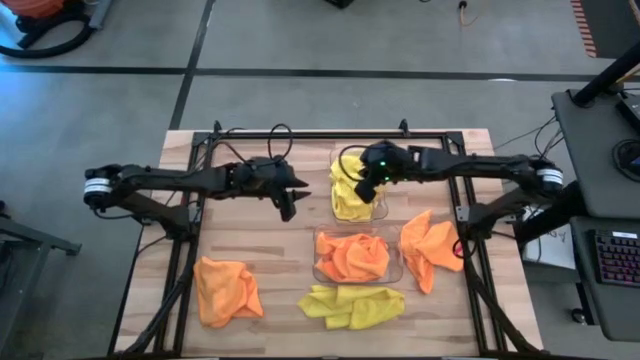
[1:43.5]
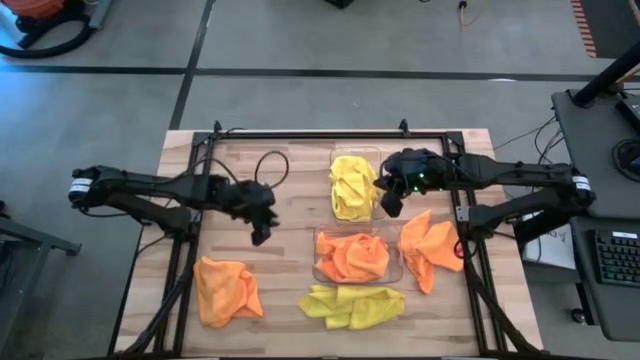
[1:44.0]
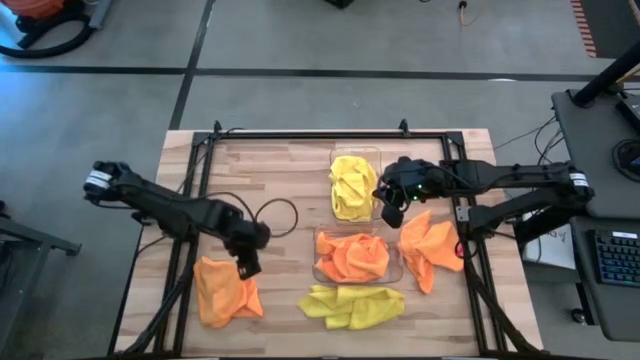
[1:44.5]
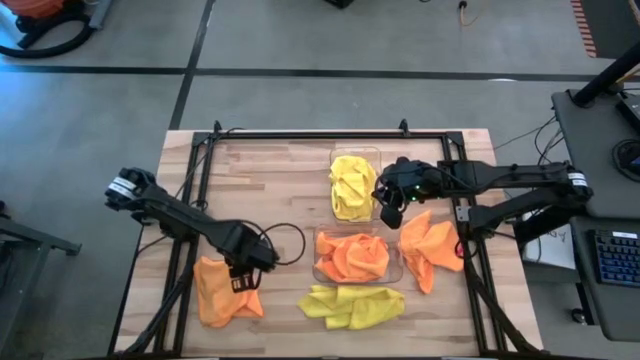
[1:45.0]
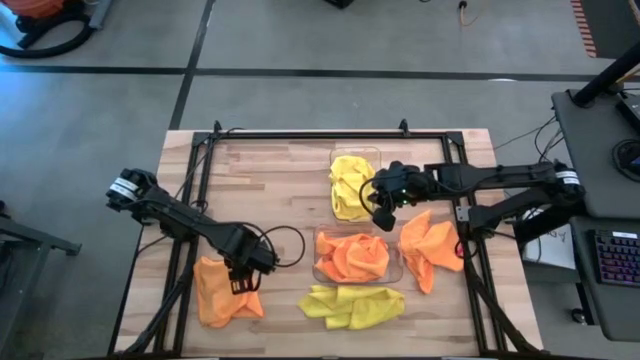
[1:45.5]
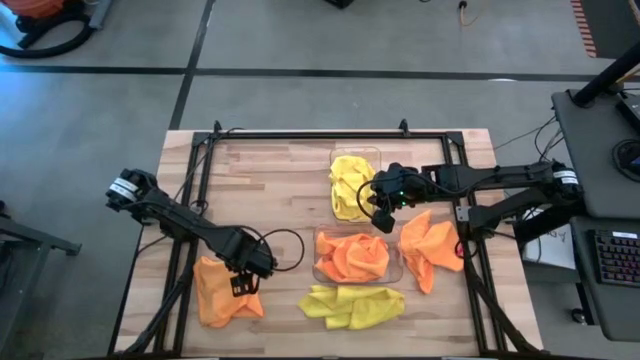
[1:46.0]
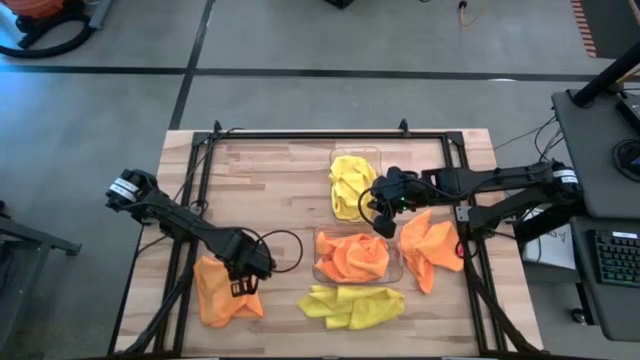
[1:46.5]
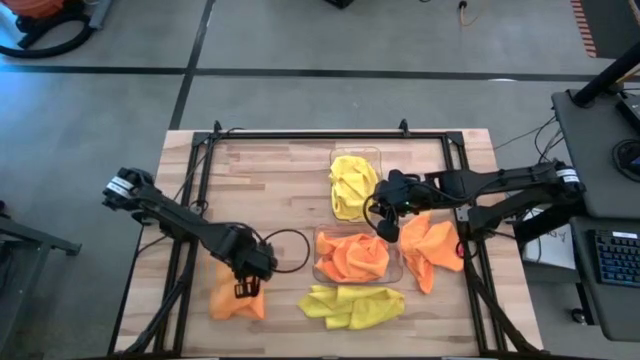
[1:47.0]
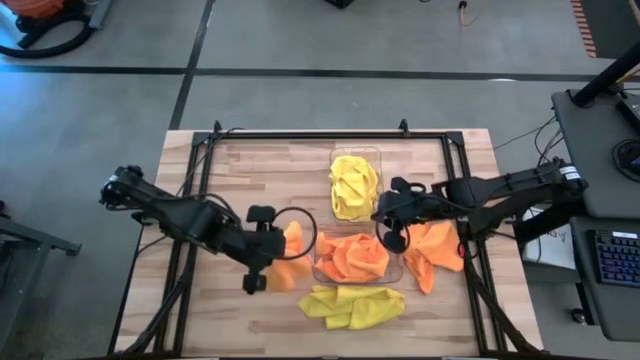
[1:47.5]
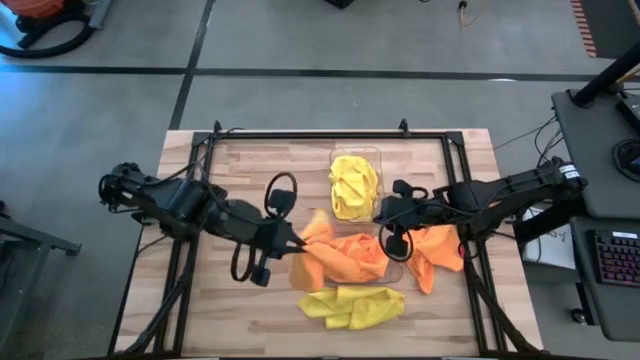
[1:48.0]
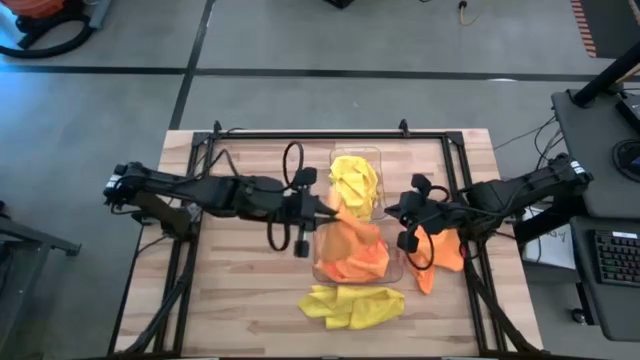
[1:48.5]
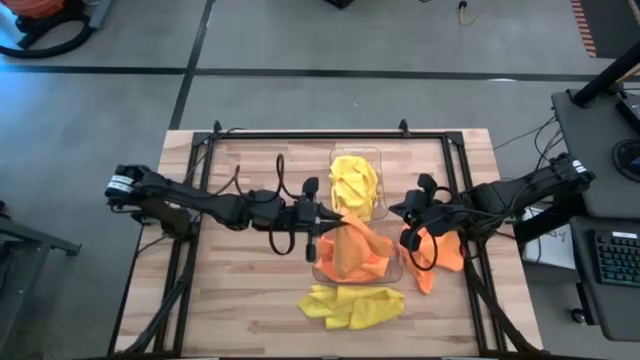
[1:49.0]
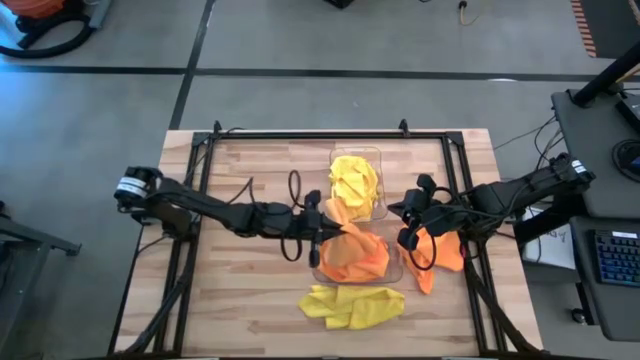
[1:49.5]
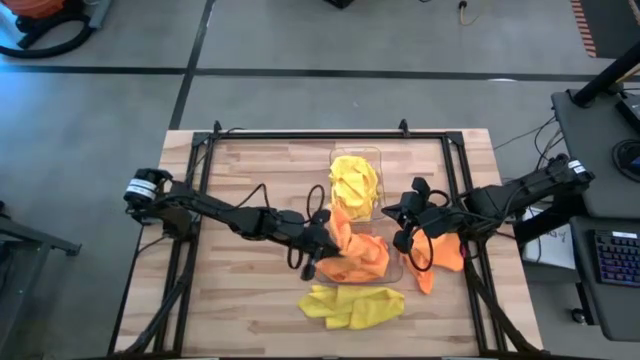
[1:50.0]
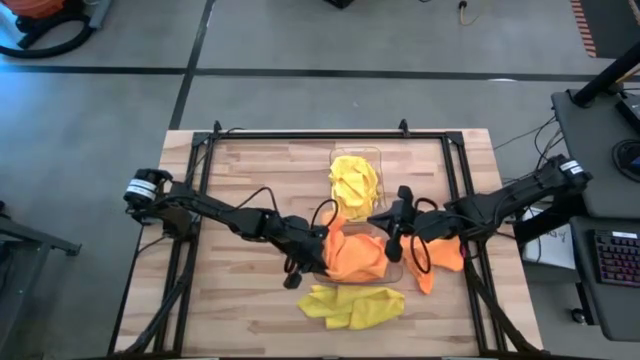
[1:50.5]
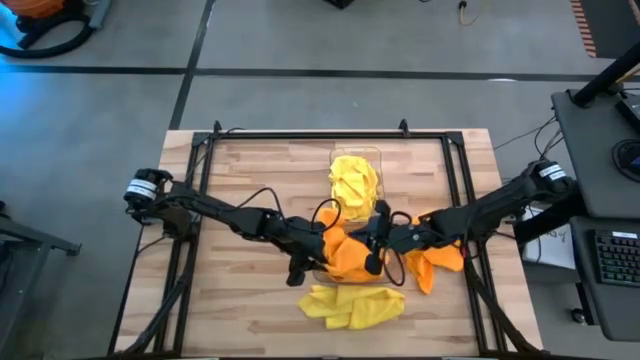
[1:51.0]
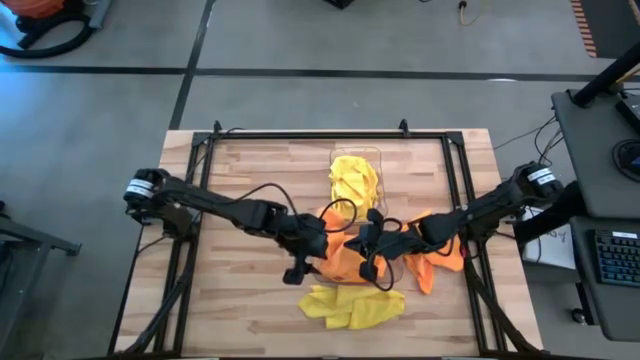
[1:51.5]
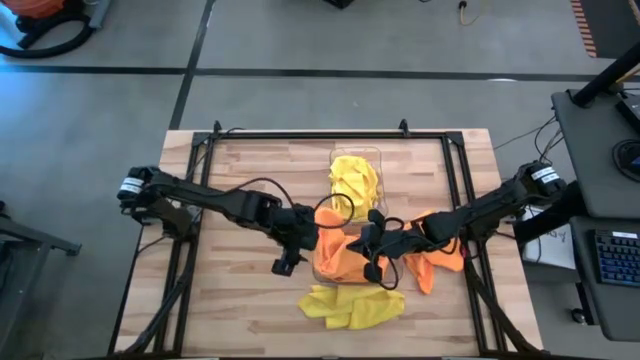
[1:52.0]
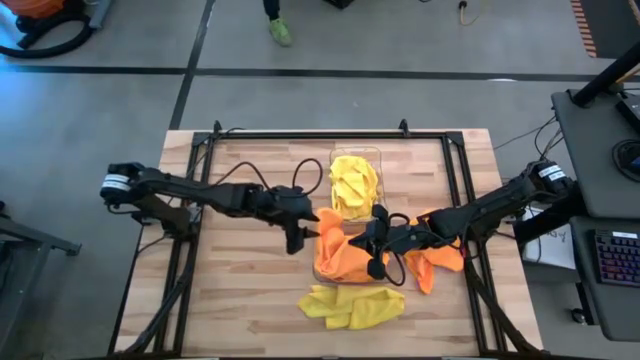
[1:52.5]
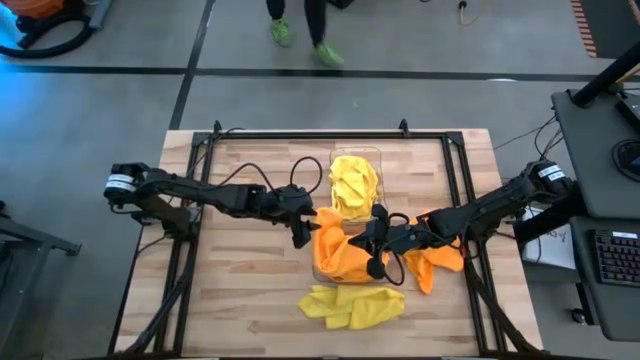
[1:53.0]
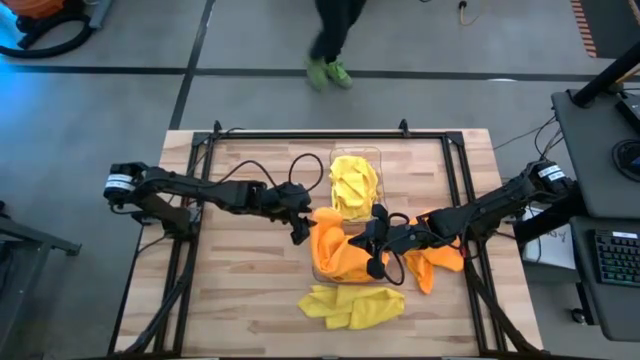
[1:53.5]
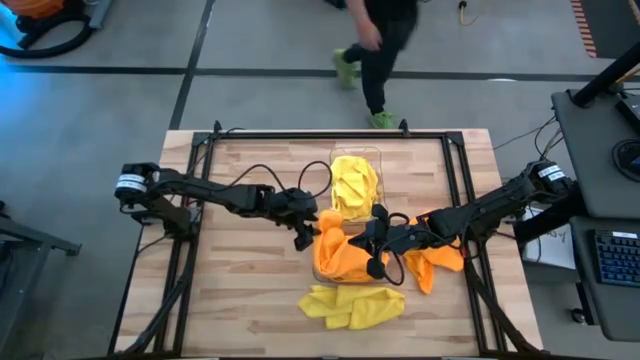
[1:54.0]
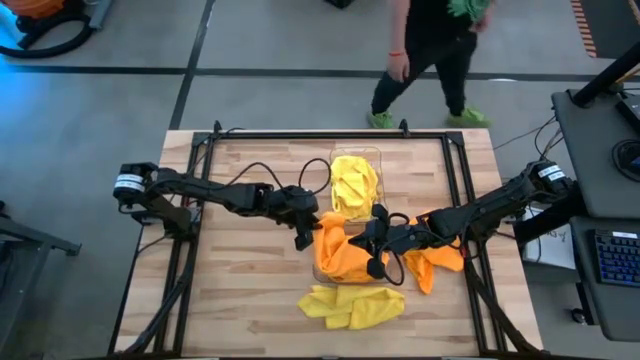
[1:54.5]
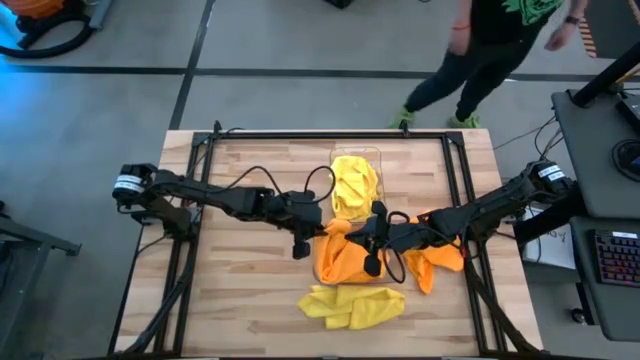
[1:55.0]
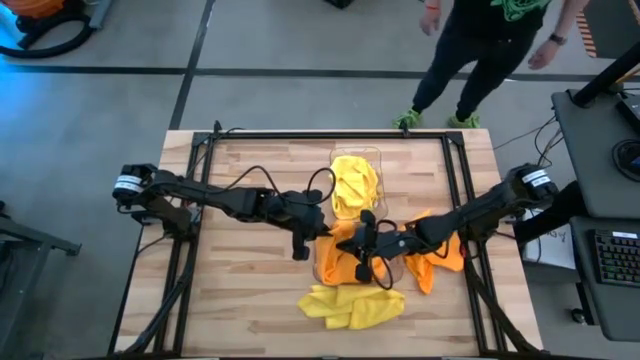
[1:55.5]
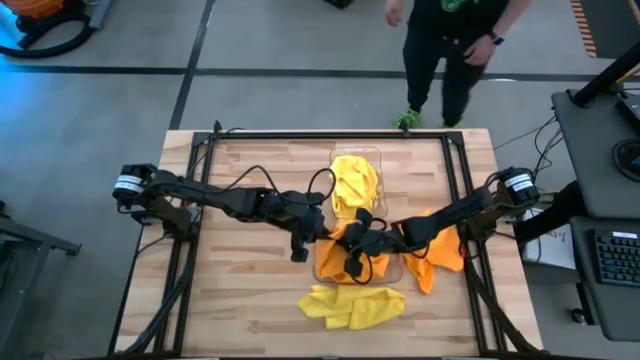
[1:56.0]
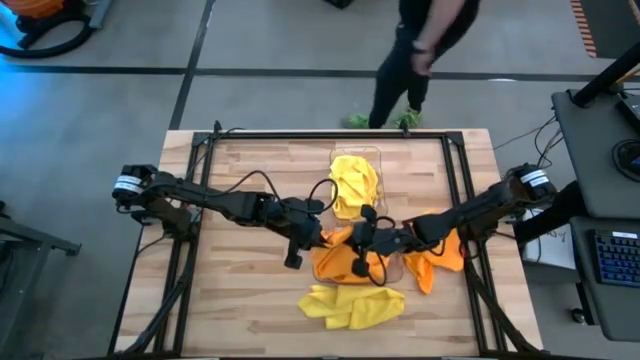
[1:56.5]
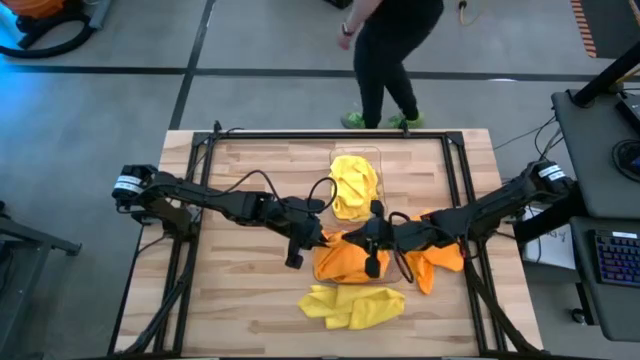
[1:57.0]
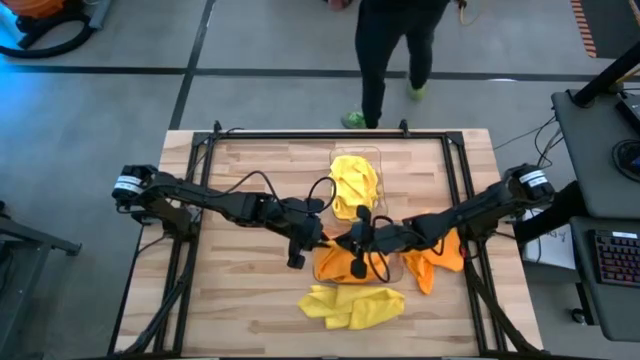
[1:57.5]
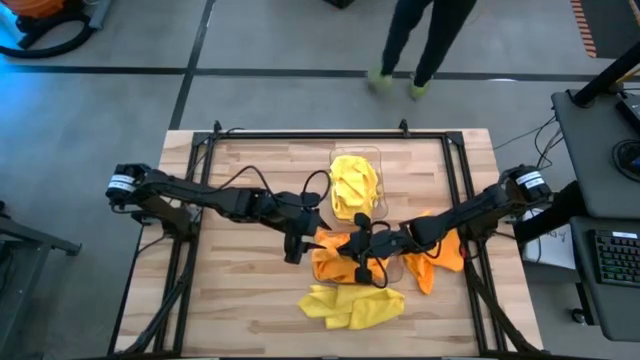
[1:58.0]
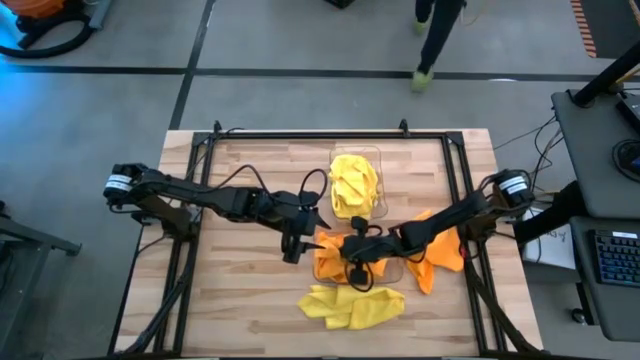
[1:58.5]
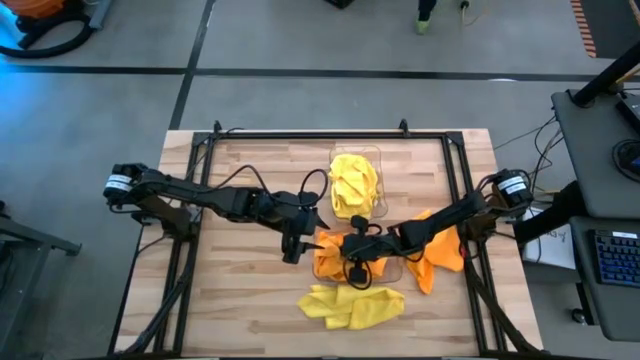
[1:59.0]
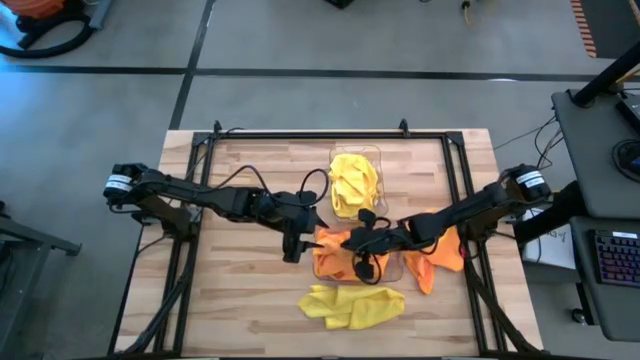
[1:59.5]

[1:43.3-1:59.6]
Task: Sort microfiber towel by color & place in baskets
Put the orange towel into the bottom transparent bin

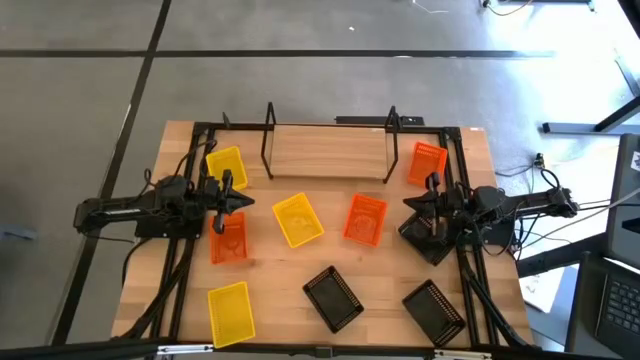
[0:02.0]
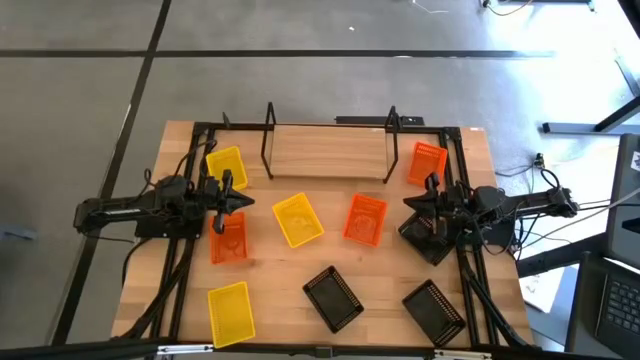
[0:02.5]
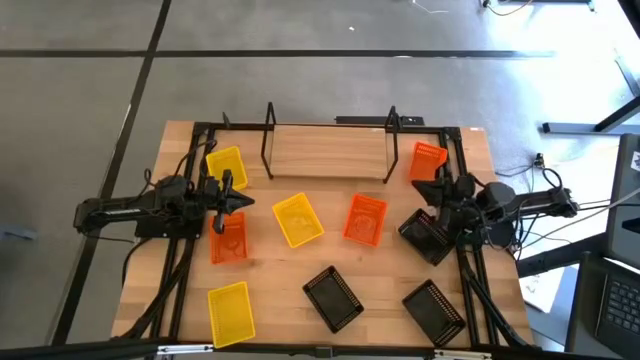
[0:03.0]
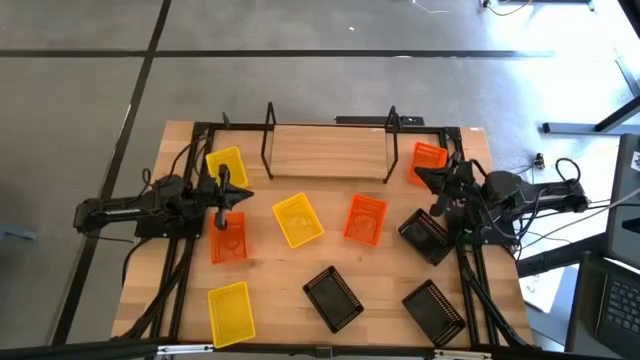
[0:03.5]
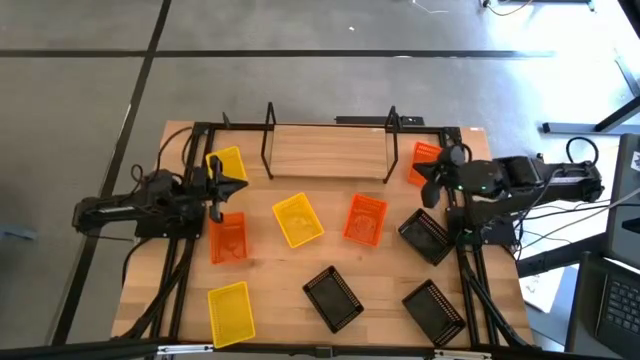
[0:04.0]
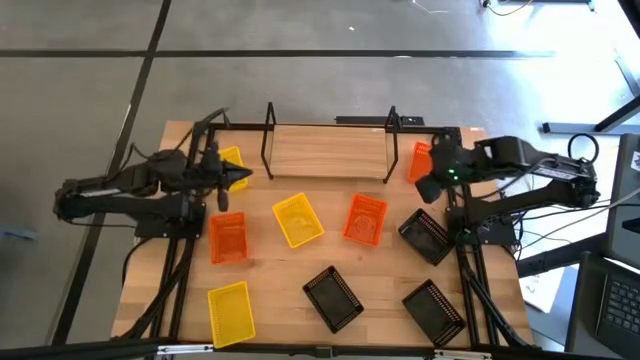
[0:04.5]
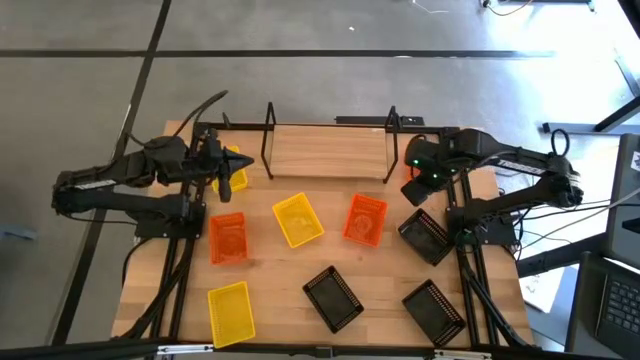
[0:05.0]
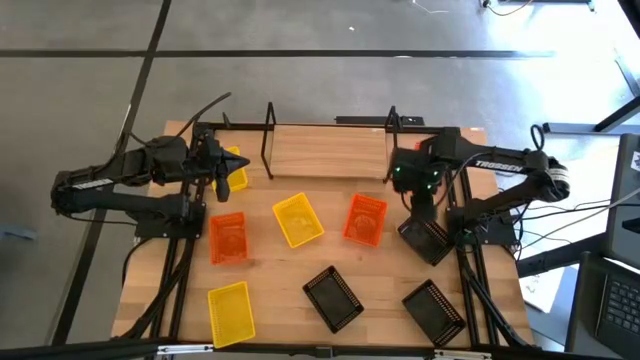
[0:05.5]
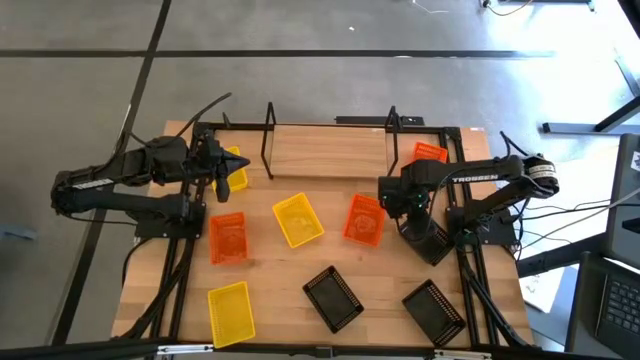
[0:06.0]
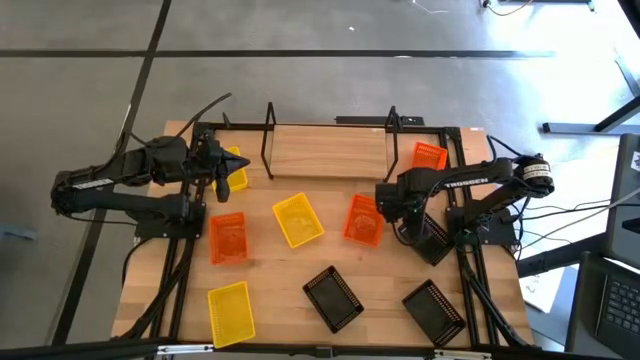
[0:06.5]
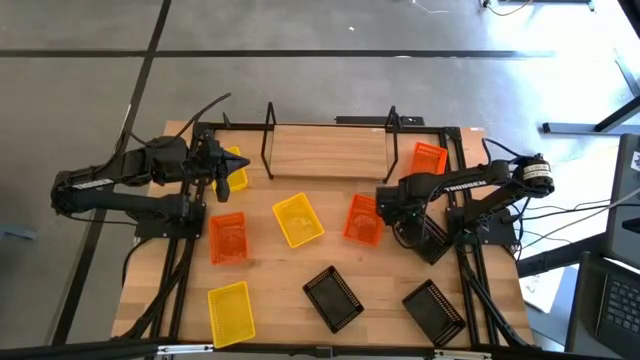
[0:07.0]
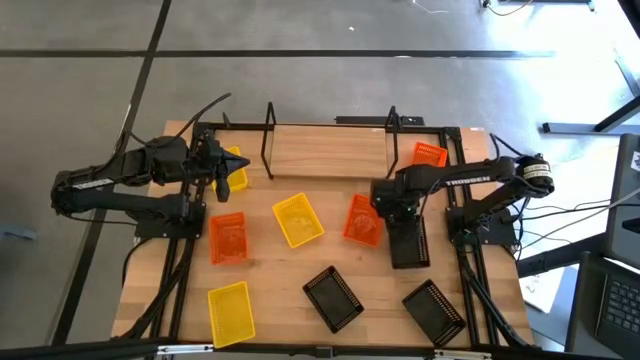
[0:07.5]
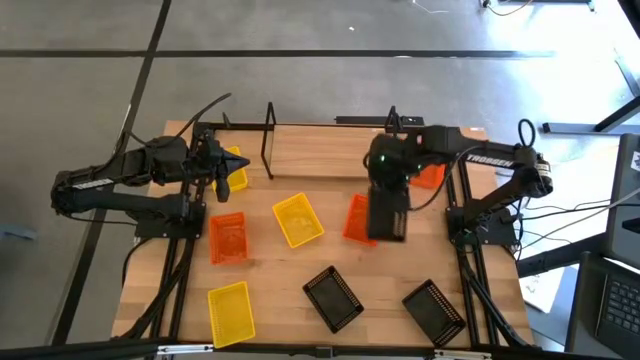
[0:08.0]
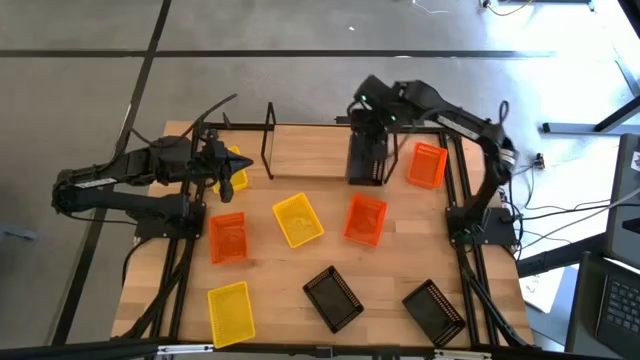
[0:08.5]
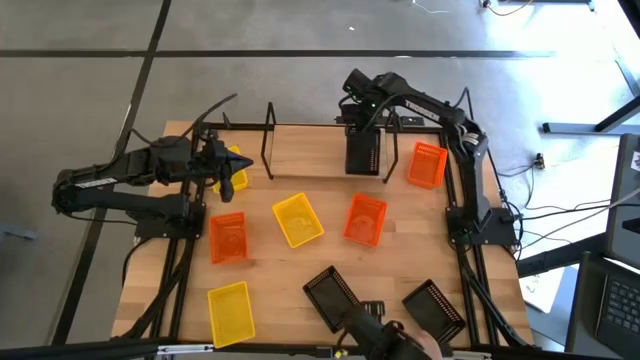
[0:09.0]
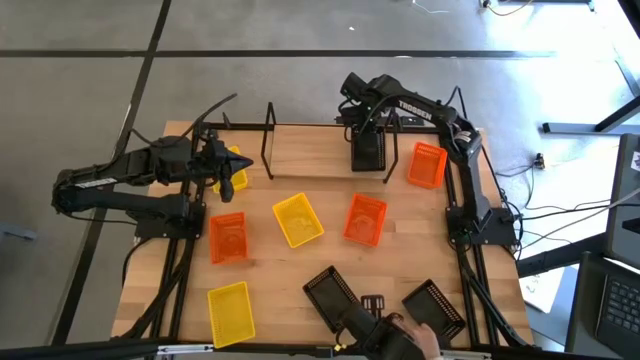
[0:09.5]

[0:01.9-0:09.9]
Task: Stack baskets on shelf by color
Put the top black bin on the shelf
